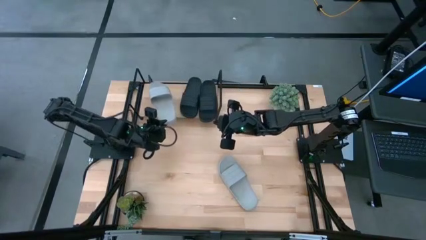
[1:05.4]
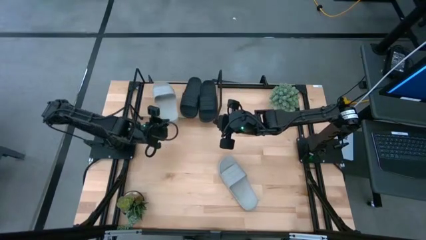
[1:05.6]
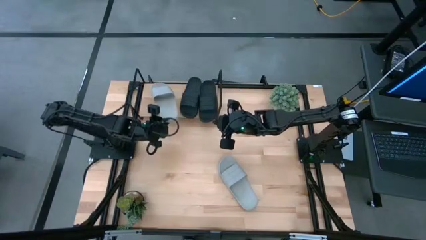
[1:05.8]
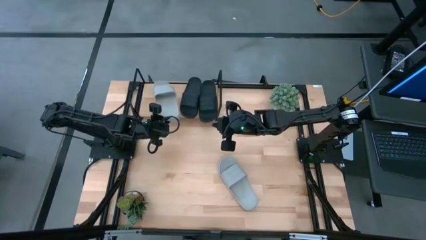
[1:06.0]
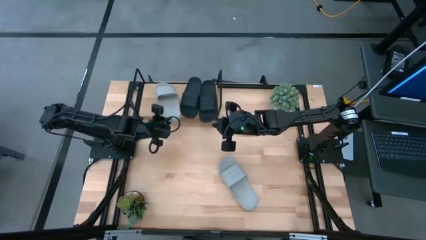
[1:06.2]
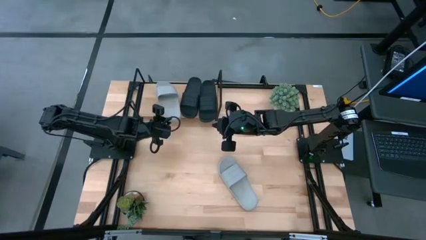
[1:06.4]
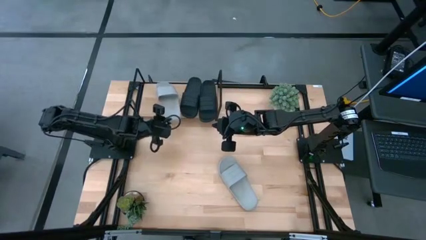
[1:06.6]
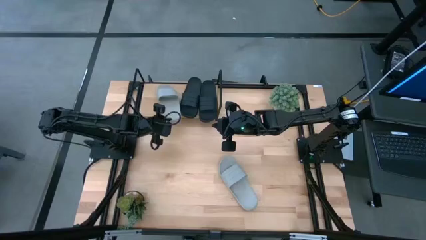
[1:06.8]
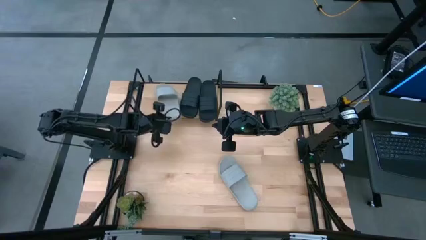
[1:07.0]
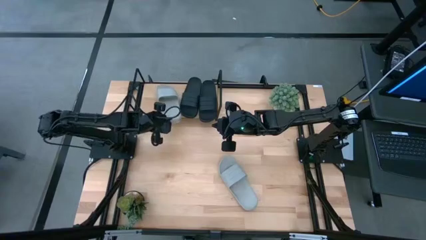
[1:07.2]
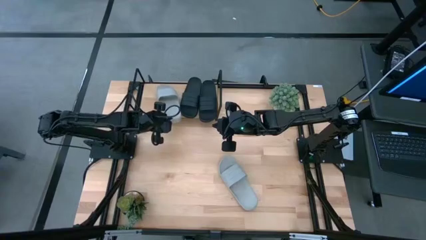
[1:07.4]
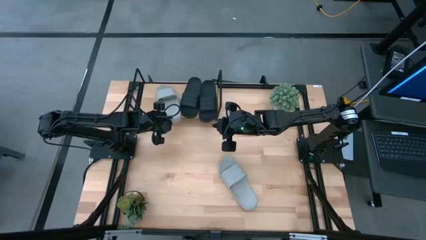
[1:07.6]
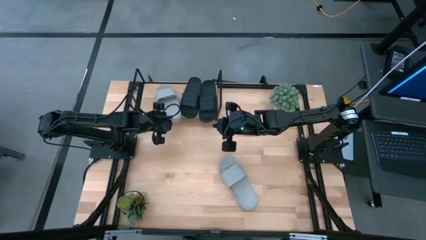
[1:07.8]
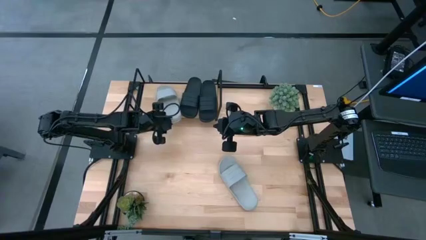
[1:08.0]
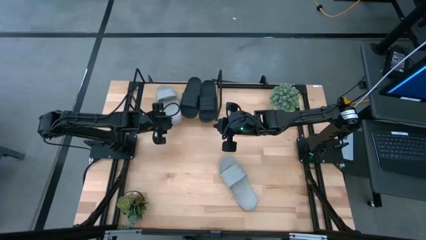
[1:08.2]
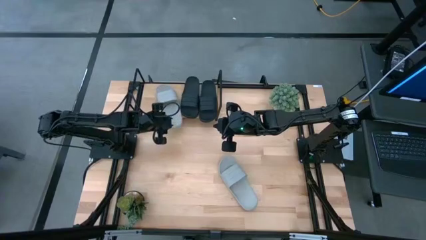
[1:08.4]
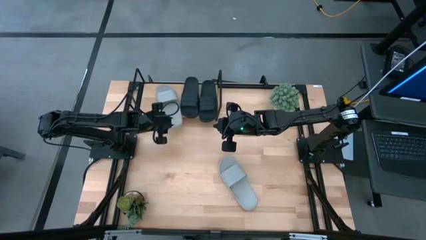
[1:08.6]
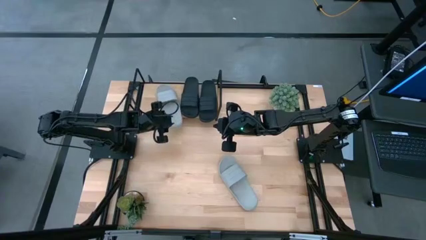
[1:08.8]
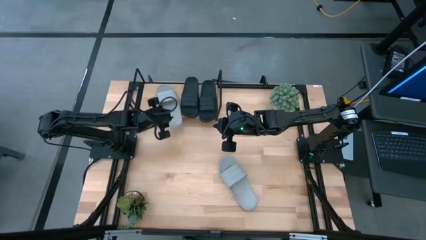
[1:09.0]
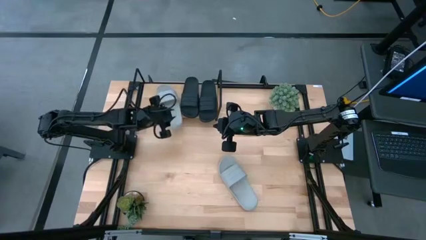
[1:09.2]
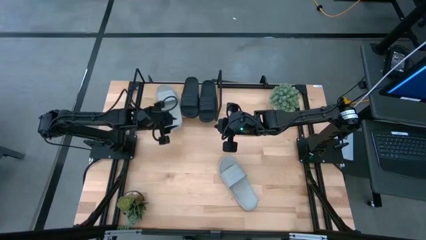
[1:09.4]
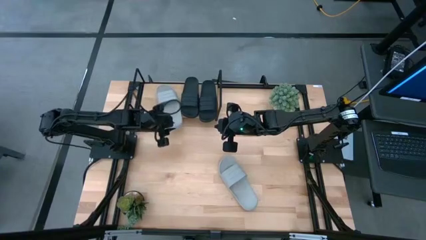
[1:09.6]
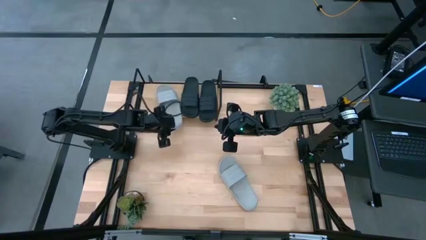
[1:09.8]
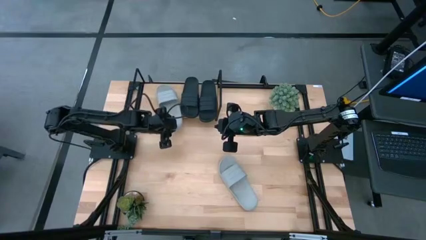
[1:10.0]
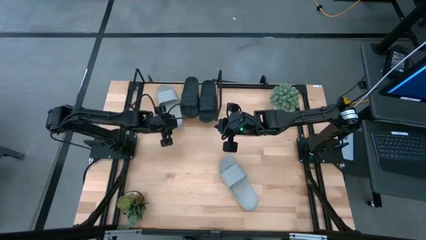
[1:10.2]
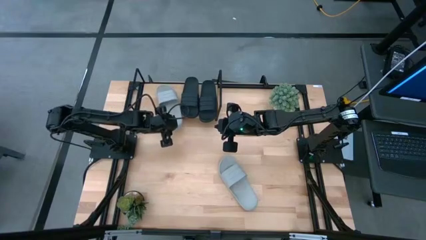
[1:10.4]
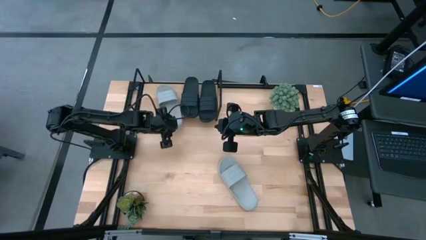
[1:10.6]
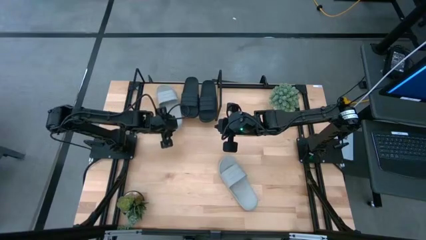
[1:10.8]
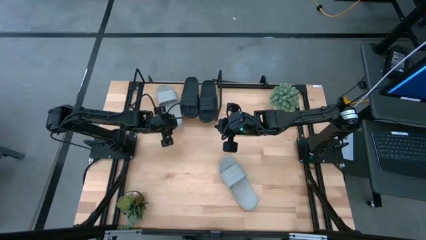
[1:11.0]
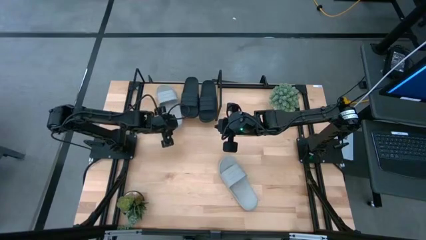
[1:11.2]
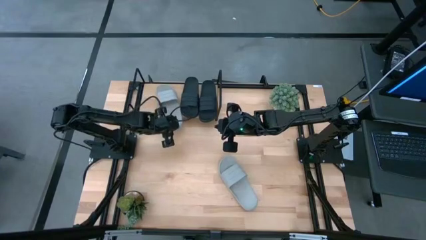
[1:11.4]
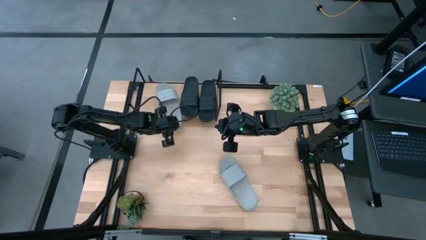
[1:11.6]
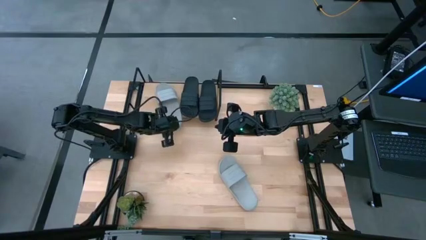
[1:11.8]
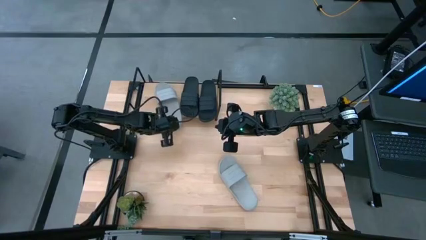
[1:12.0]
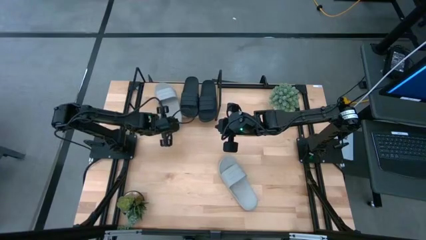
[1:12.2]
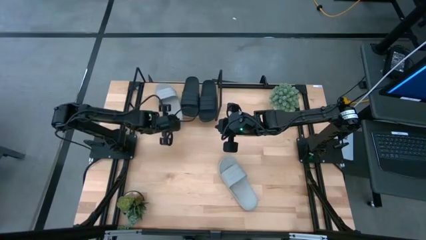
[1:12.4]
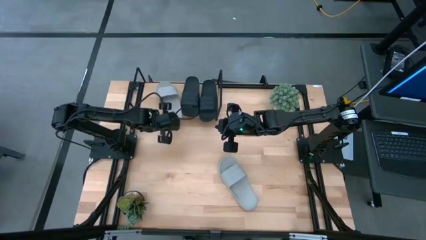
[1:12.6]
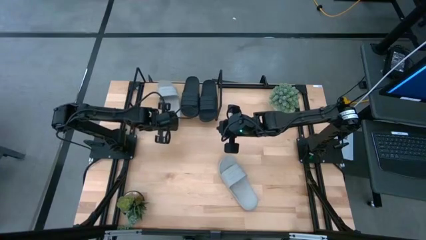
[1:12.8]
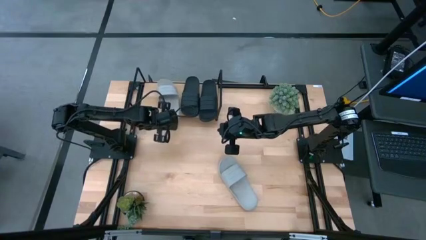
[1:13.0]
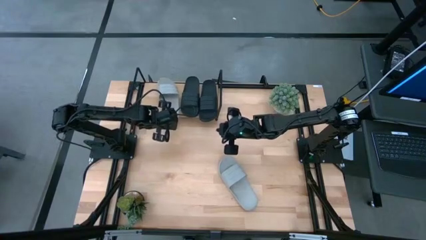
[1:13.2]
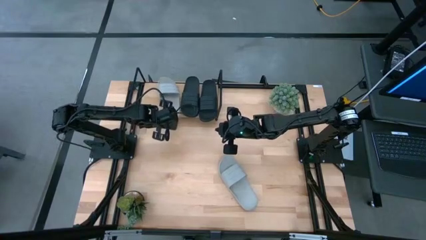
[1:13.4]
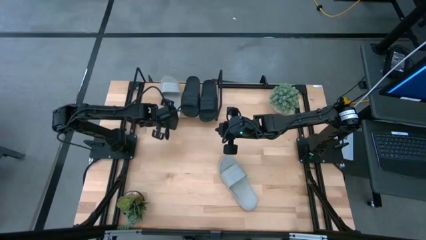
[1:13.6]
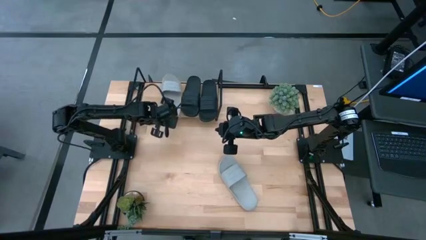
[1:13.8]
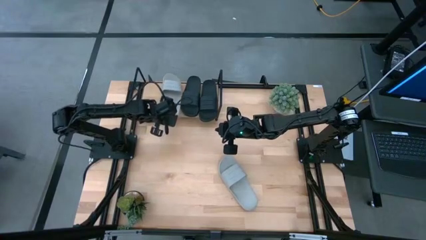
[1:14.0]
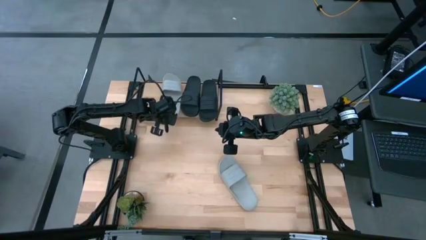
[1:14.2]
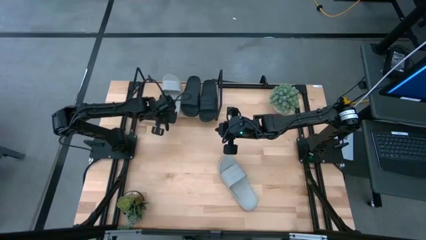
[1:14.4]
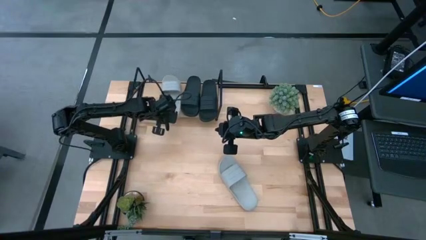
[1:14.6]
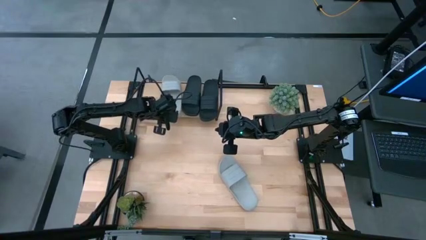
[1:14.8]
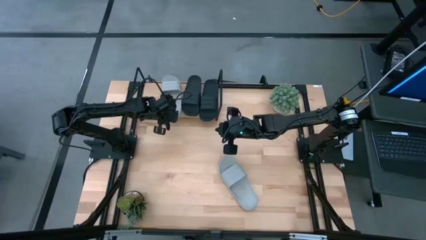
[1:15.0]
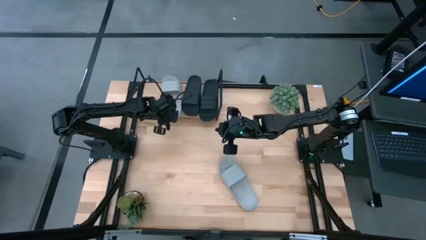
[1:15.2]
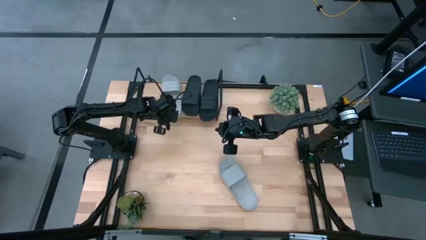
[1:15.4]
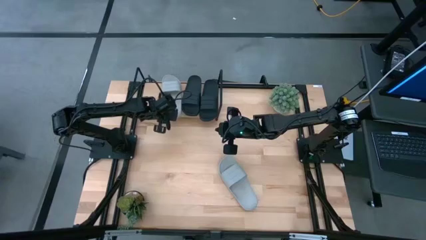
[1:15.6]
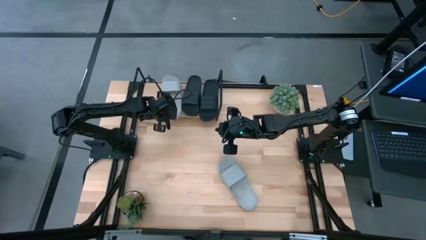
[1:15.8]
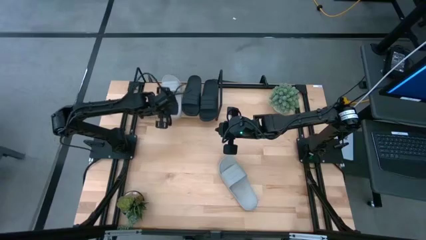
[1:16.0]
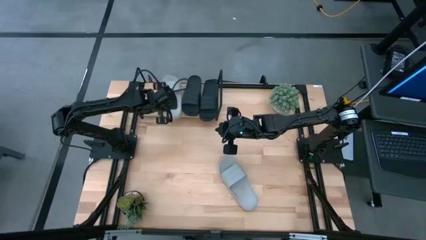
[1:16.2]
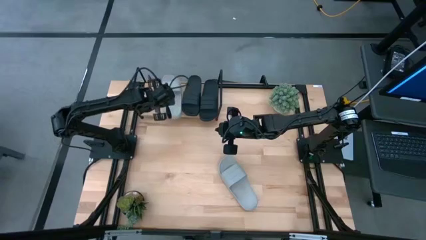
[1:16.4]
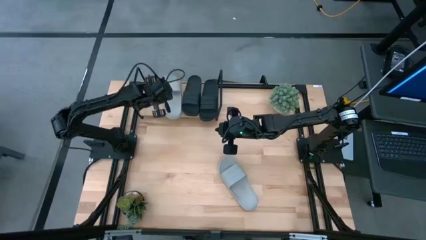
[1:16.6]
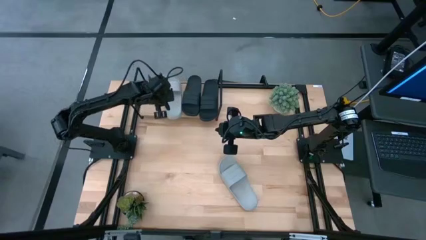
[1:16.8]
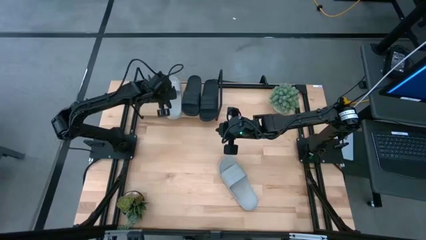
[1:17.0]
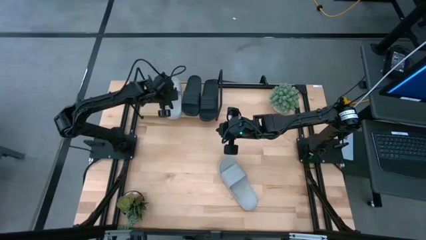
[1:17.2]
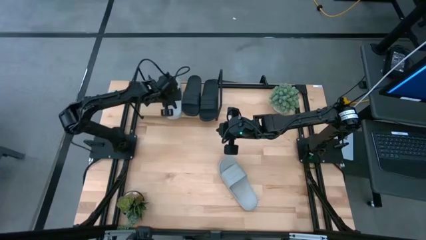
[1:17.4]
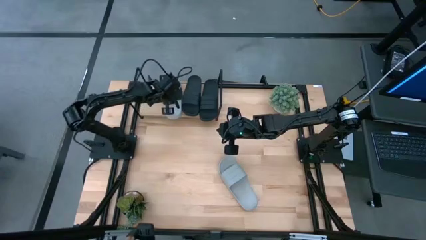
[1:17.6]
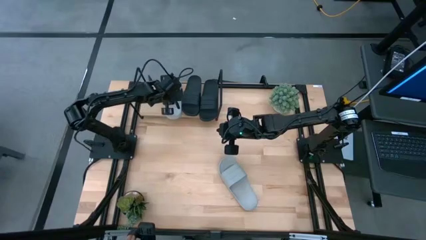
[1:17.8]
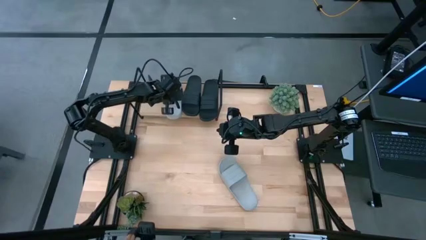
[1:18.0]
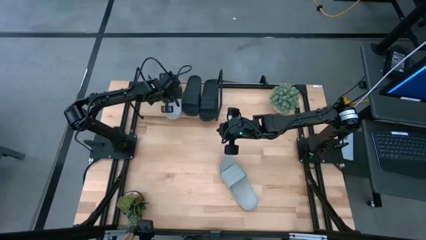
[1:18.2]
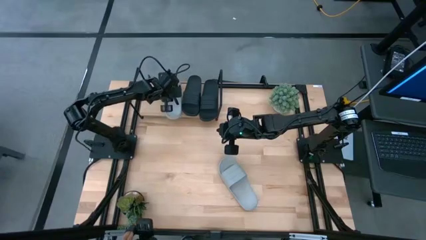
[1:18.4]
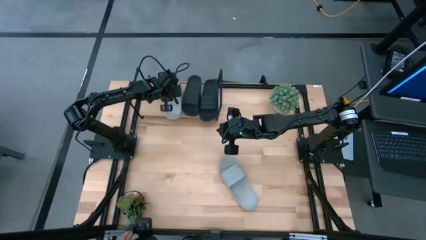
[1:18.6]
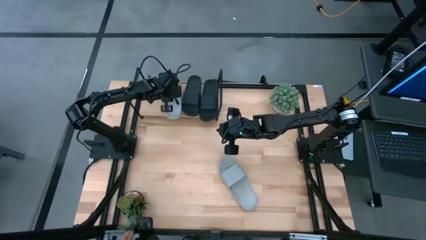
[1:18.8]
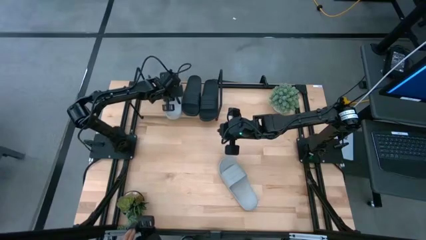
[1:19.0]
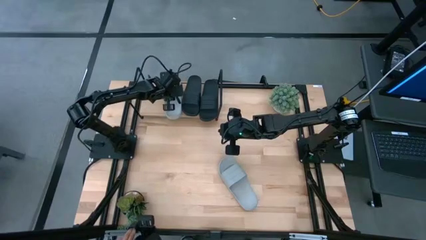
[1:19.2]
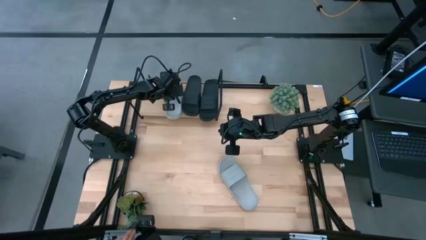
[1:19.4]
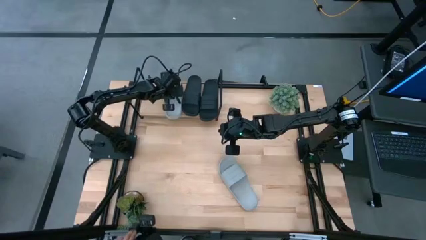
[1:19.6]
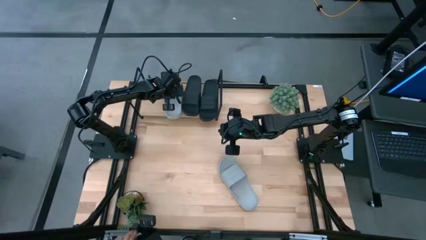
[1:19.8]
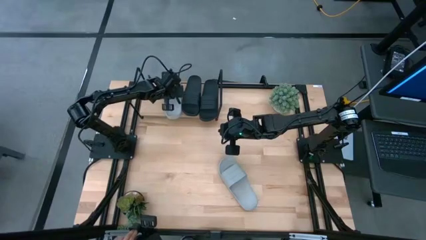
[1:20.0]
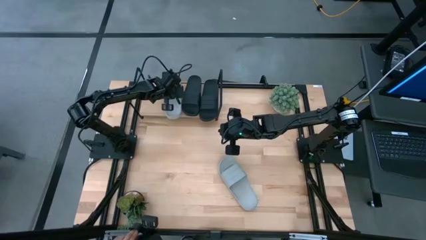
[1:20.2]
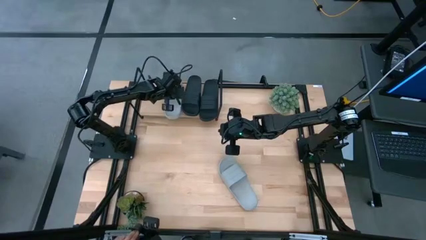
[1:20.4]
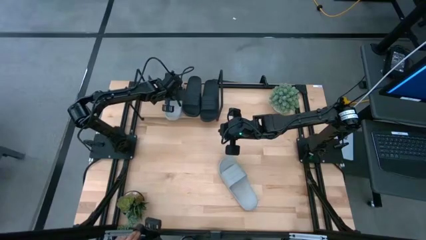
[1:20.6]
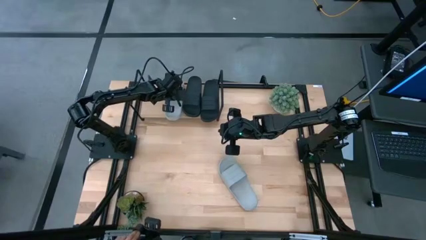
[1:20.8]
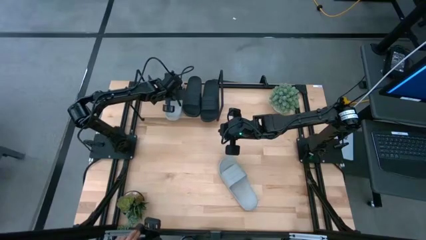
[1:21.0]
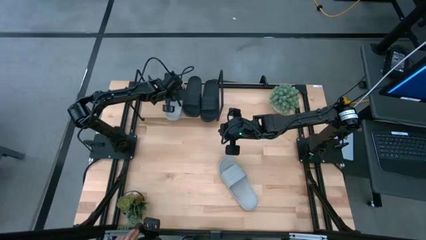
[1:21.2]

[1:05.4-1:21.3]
Task: Pick and place slides into the shelf
Put the top gray slides on the shelf

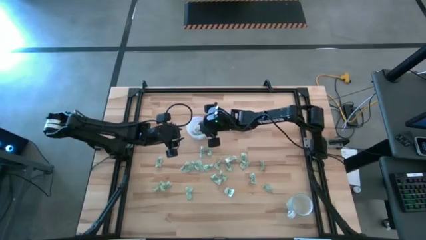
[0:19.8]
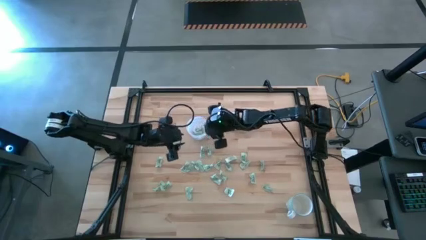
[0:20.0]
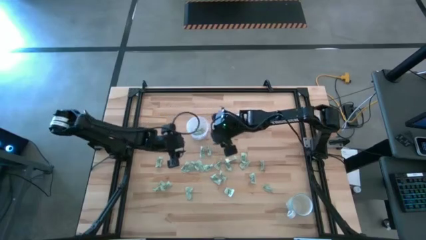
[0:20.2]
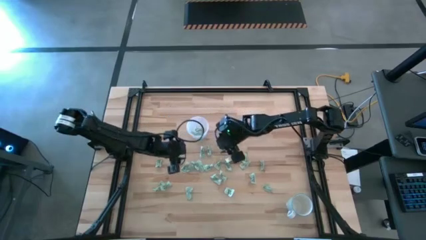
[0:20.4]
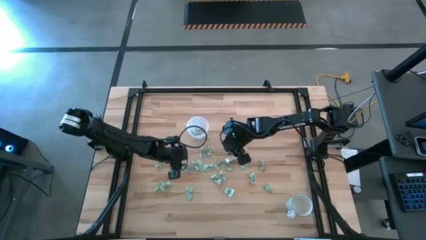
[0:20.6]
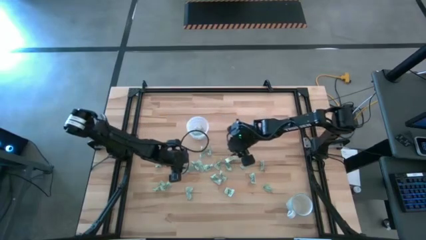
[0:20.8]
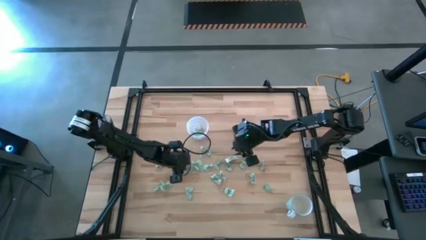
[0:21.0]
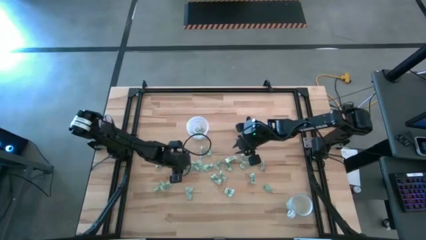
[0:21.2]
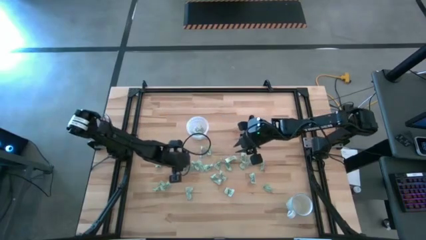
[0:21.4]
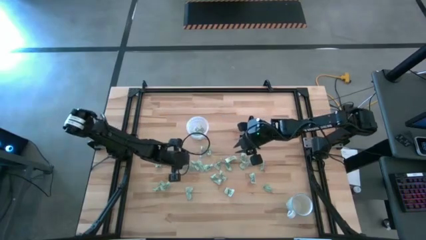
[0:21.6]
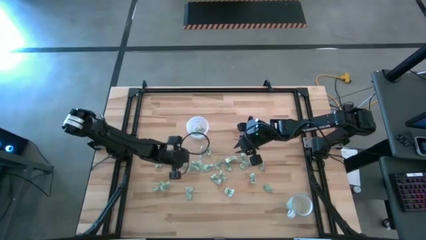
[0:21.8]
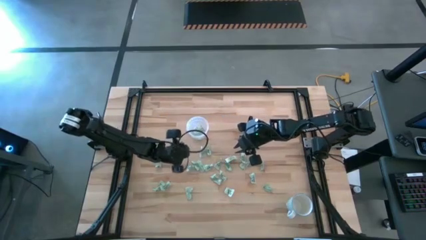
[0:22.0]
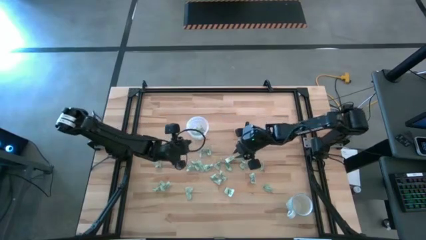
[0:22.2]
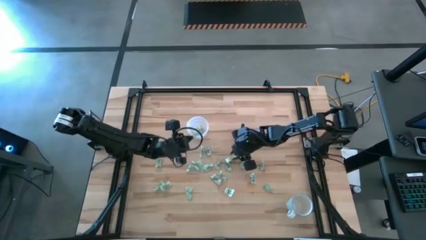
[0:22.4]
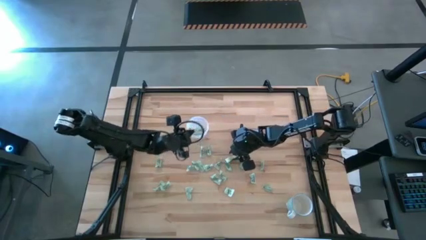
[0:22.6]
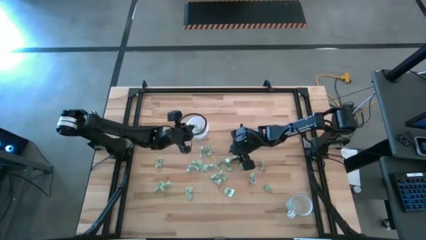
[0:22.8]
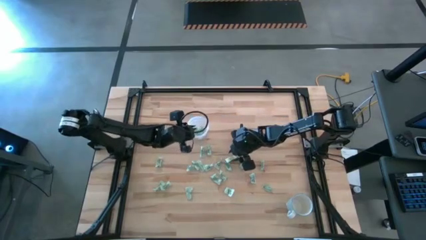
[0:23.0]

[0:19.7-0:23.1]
Task: Pick and place Stevia / Truvia into bins
Put the stevia packet into the transparent container
